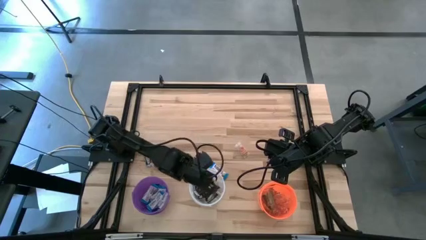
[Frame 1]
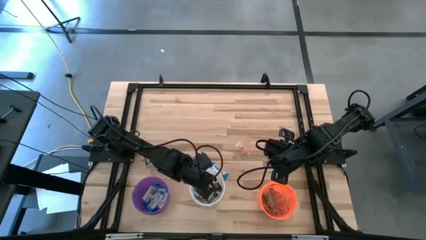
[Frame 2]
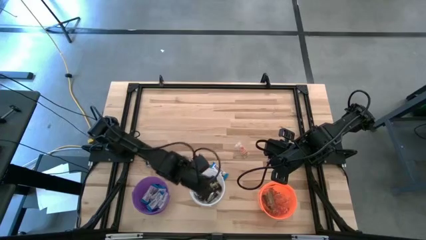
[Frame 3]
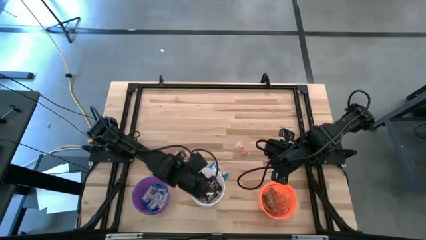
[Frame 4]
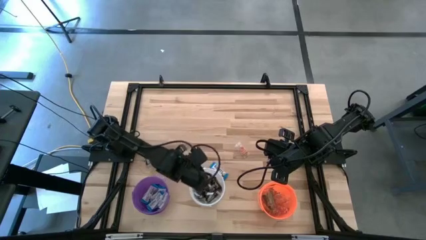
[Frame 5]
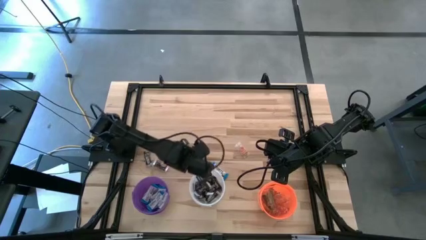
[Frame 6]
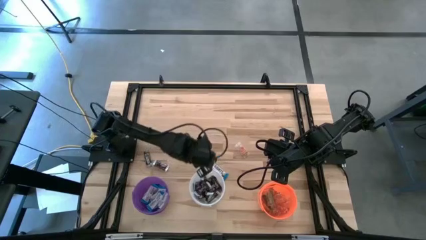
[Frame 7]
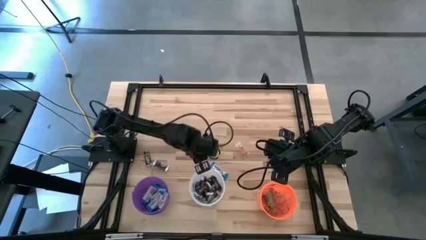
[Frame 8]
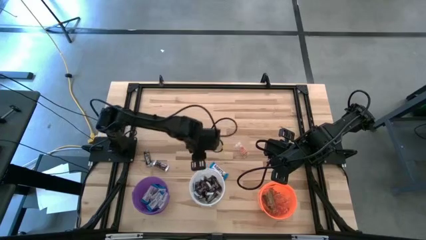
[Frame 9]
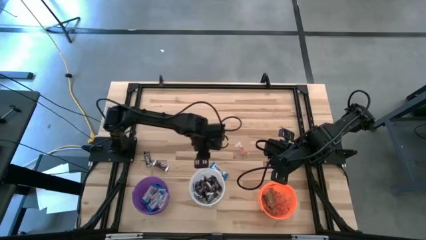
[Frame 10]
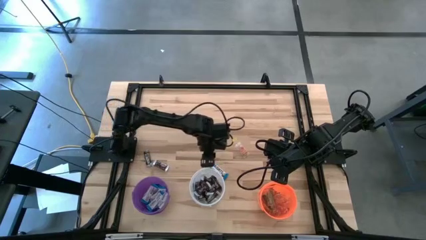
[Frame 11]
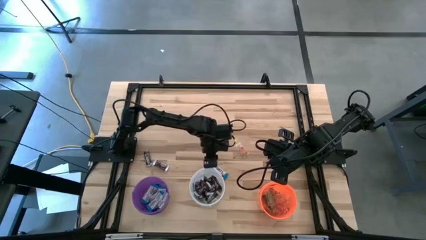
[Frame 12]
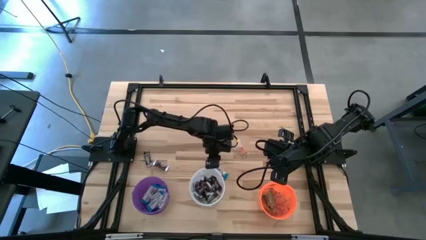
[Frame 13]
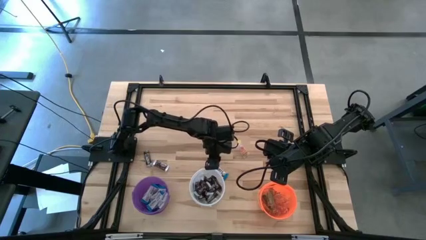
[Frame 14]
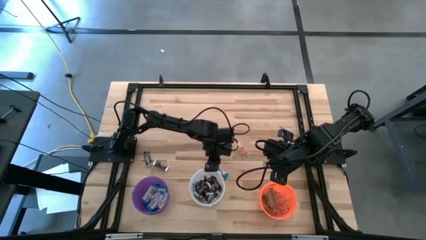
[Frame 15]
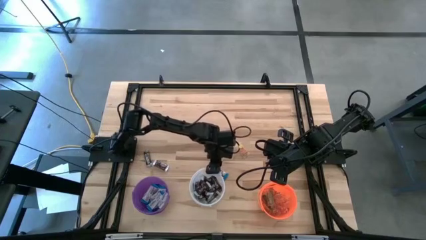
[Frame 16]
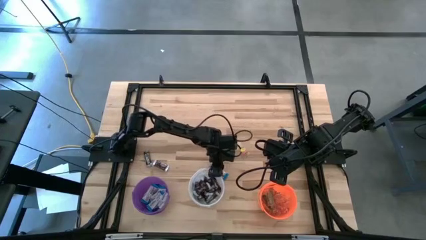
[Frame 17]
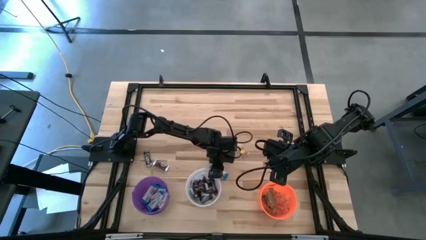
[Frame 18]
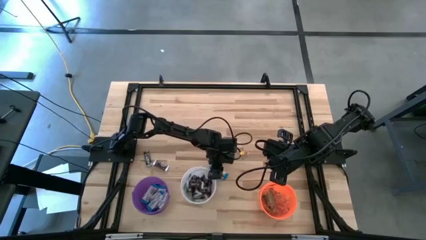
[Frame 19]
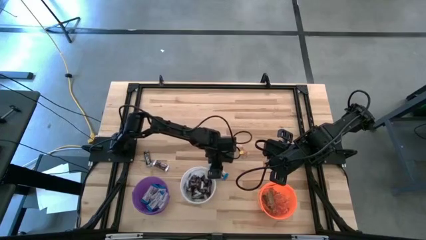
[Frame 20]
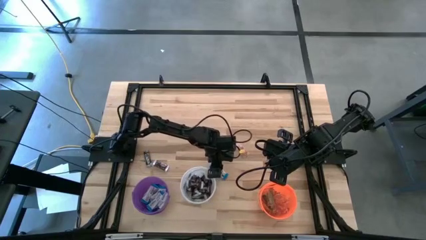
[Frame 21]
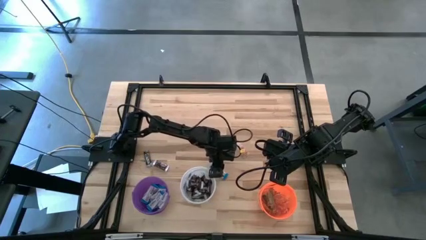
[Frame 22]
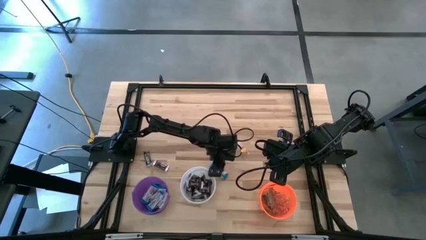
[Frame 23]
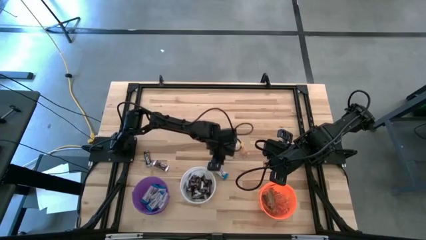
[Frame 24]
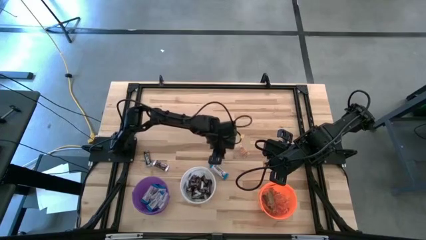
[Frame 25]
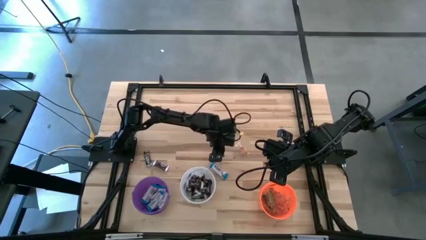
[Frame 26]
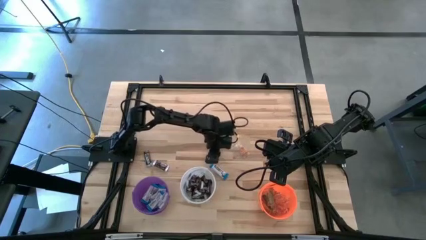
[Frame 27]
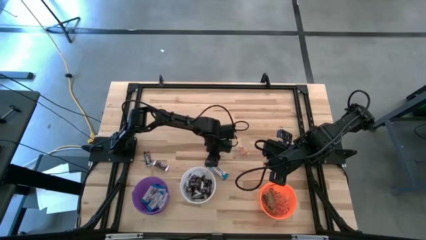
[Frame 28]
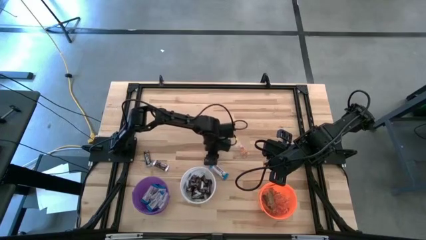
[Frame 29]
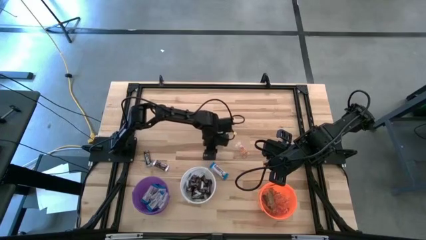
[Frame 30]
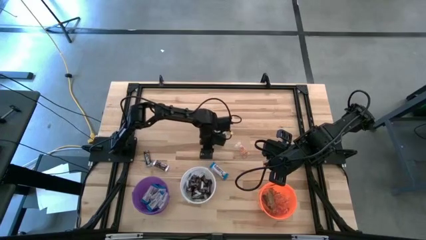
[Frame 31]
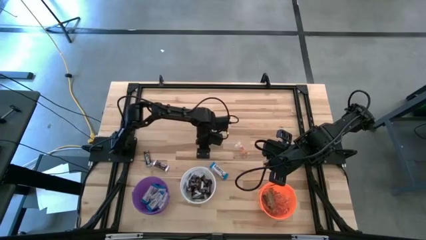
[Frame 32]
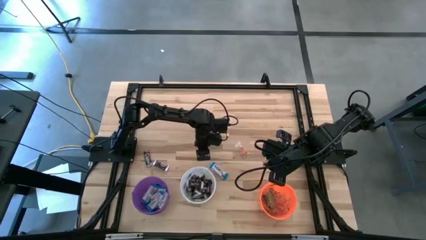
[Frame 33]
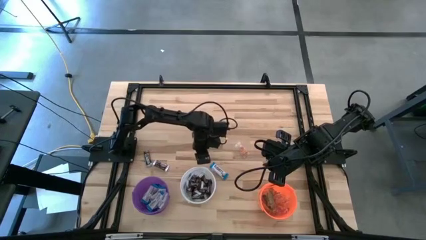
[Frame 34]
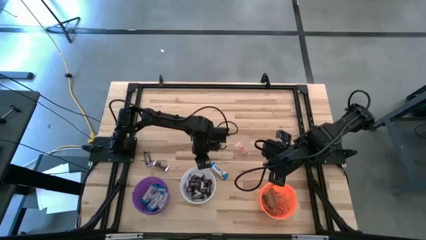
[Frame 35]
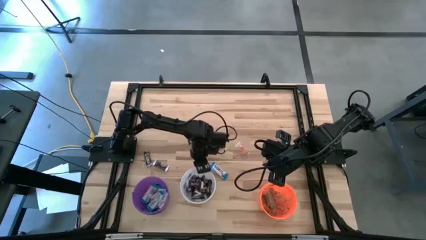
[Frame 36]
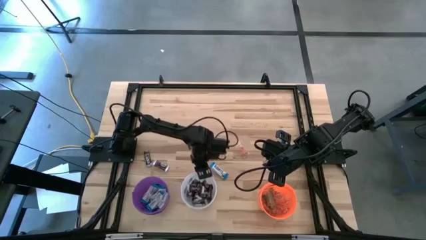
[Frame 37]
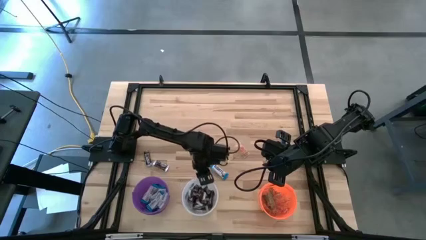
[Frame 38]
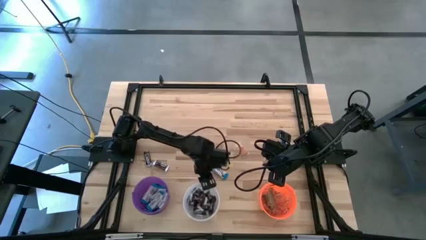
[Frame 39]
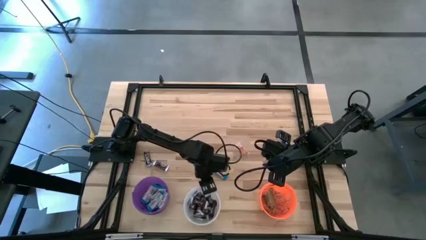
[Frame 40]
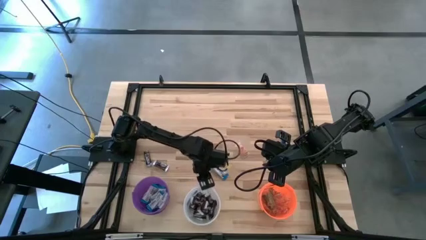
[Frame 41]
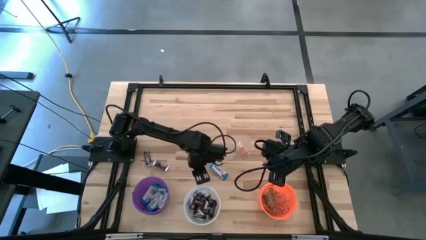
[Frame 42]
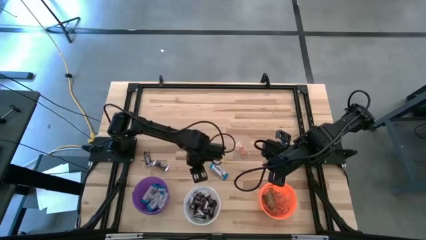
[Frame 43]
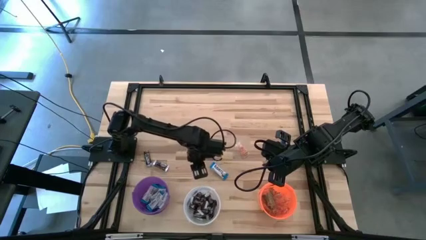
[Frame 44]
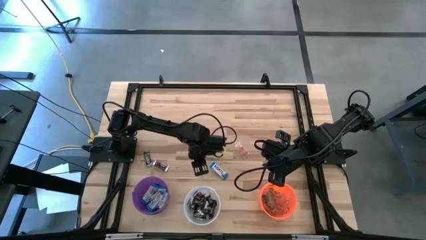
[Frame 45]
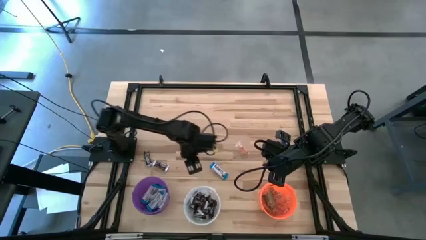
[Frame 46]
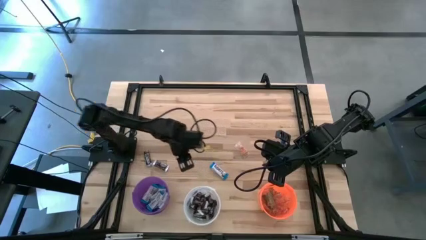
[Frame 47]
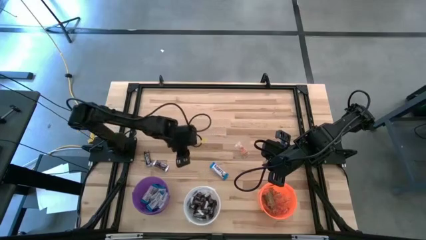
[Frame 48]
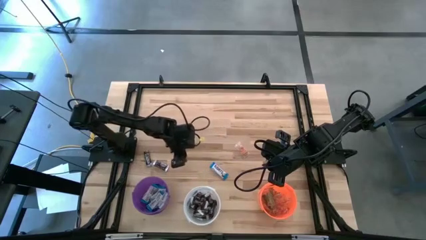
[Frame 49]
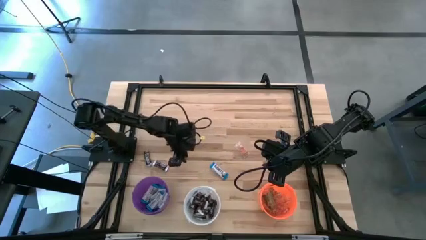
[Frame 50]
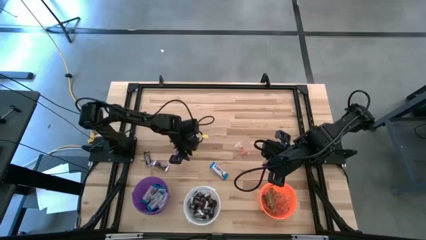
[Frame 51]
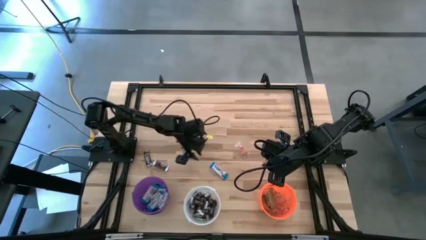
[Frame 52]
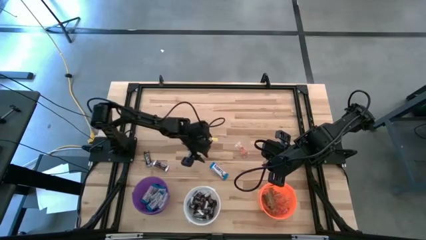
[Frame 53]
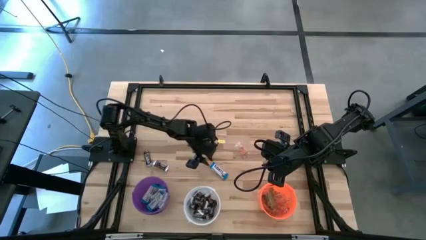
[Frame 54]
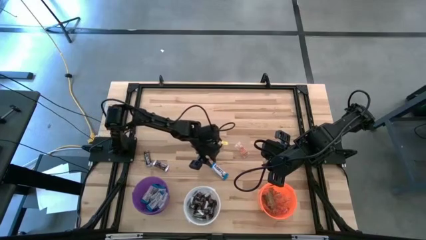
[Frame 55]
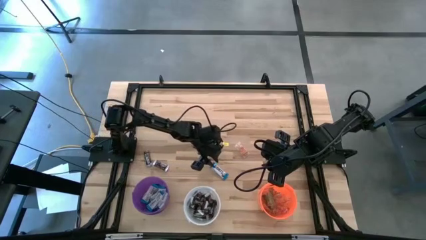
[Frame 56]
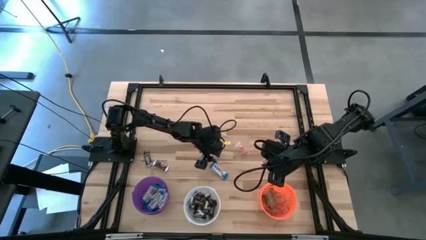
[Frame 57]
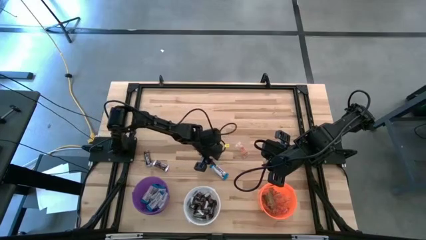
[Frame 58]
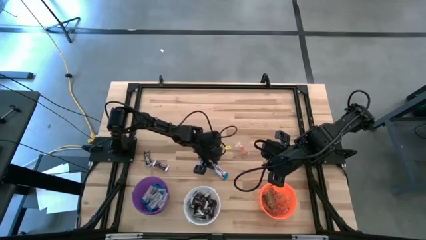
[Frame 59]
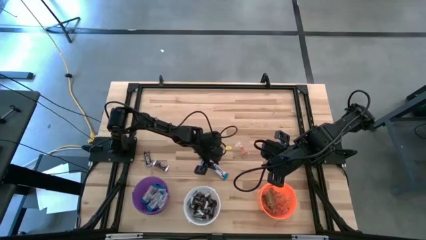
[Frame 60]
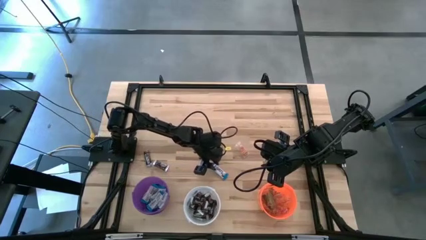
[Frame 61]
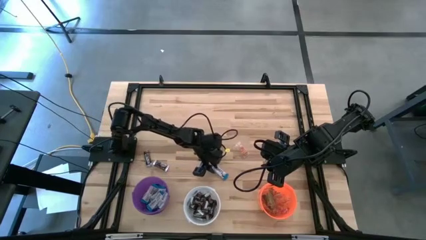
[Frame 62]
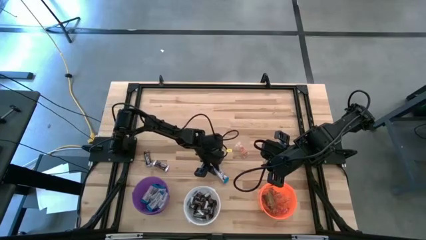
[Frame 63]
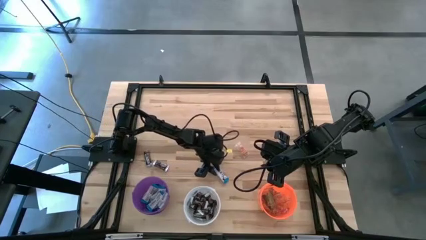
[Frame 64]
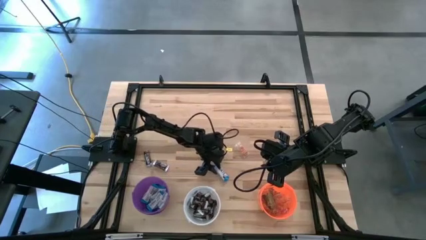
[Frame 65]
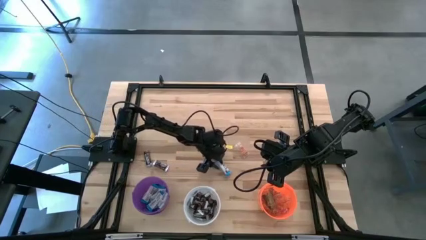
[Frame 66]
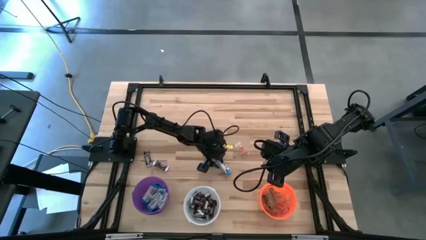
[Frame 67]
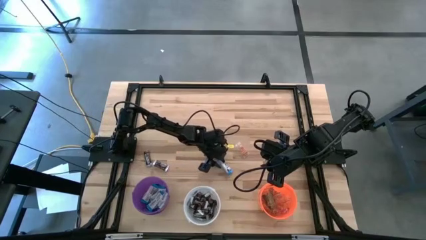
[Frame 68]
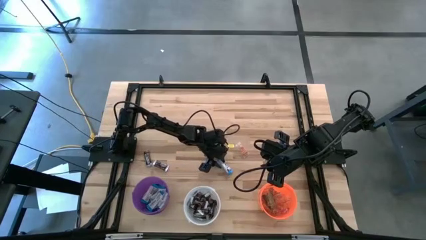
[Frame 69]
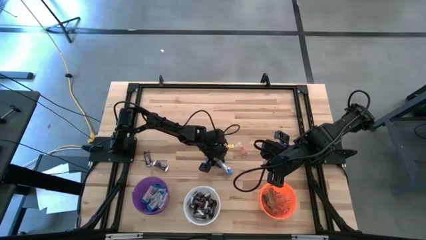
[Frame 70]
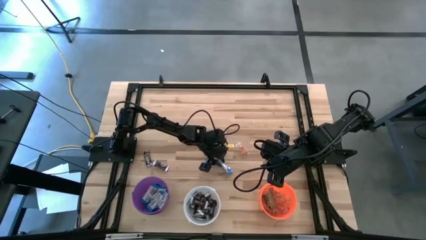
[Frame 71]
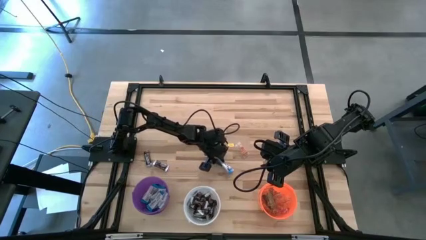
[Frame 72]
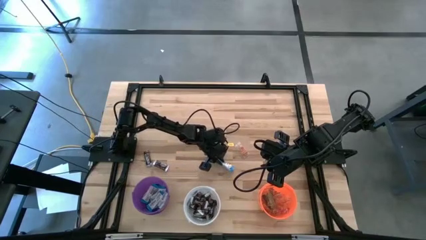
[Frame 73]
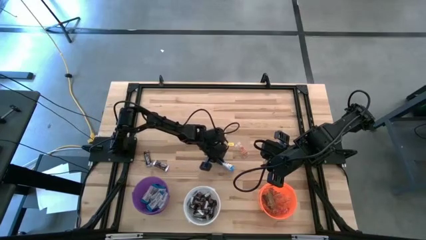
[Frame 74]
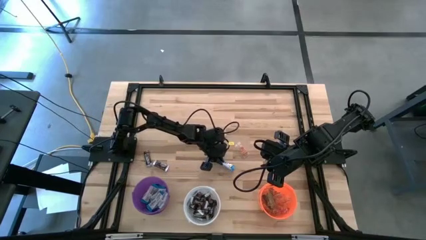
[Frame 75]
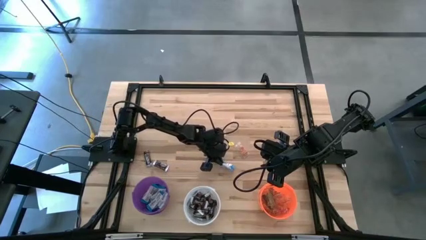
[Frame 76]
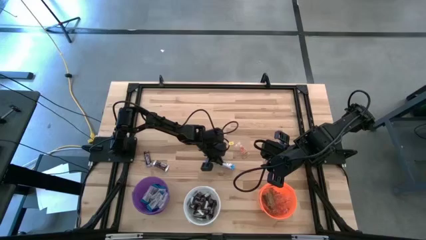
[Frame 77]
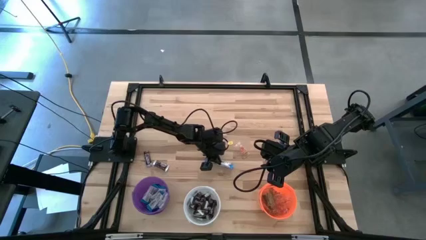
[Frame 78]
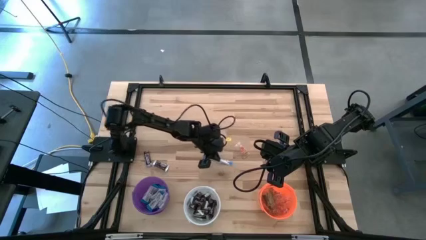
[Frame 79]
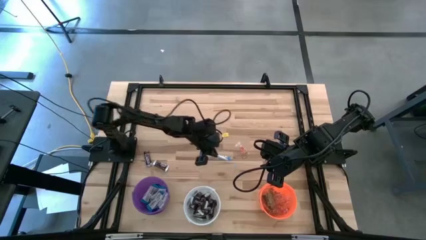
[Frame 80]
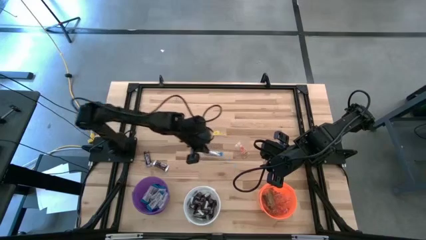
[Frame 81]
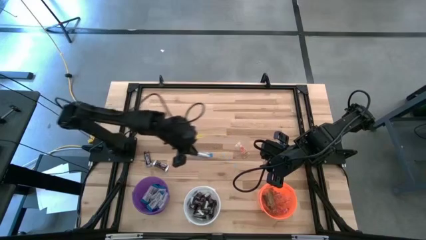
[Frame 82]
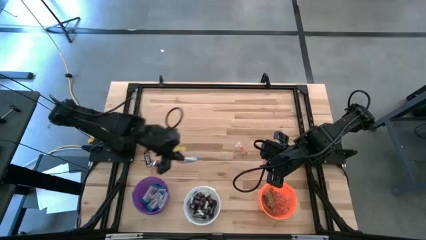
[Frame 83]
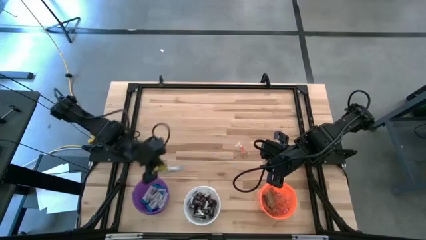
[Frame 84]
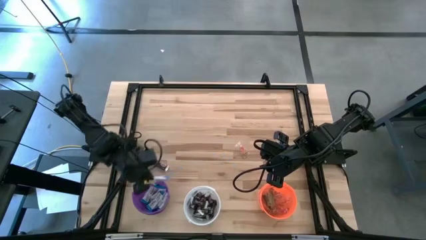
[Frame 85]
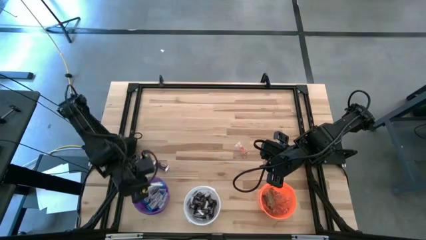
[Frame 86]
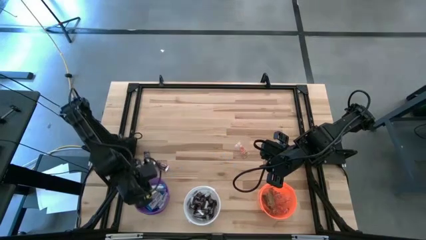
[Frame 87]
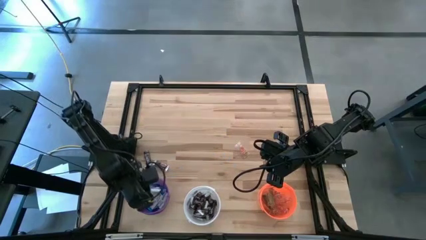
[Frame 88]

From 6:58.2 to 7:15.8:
Task: Sort candy
Put the white chocolate into the violet bucket
